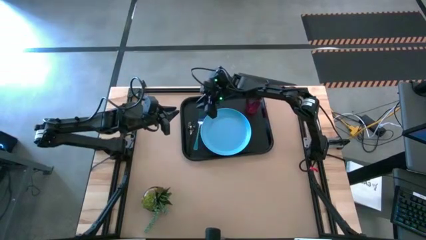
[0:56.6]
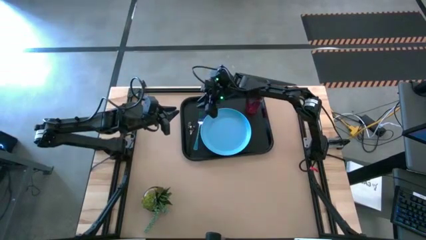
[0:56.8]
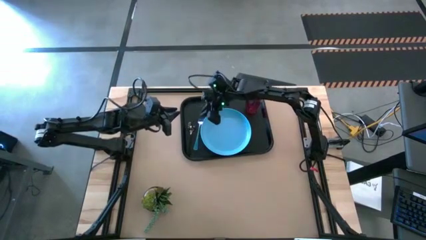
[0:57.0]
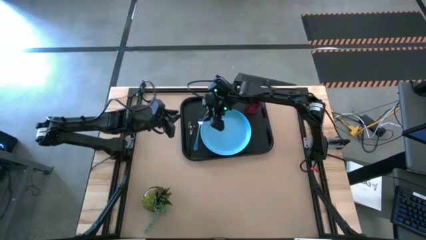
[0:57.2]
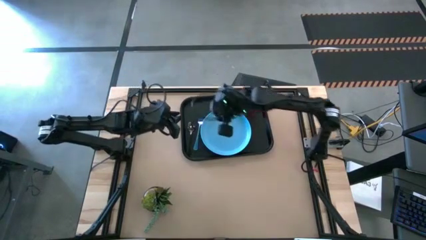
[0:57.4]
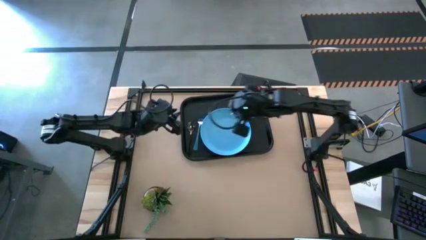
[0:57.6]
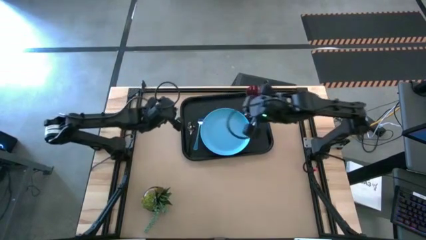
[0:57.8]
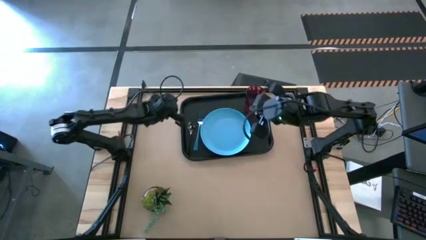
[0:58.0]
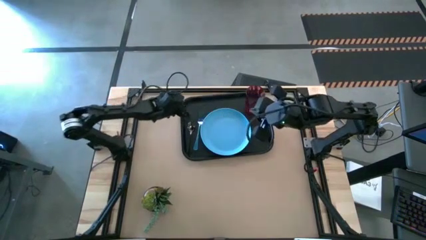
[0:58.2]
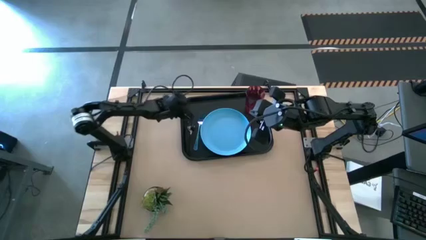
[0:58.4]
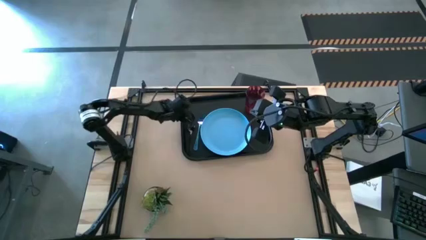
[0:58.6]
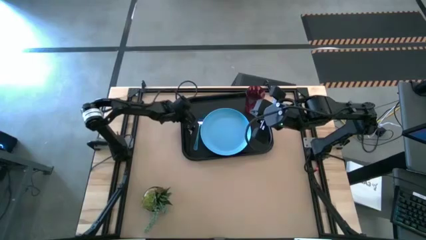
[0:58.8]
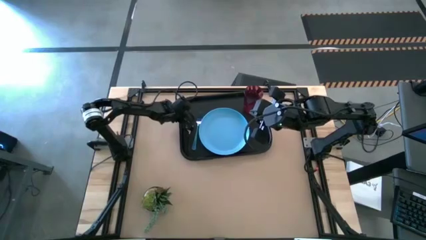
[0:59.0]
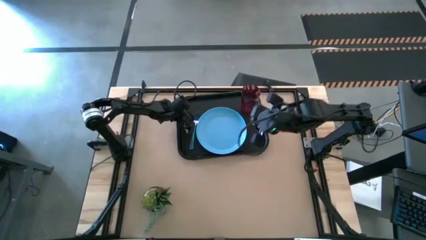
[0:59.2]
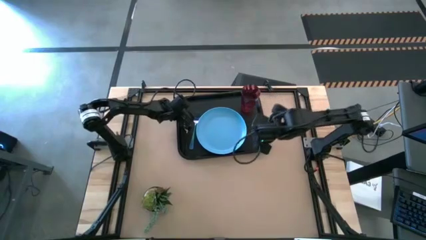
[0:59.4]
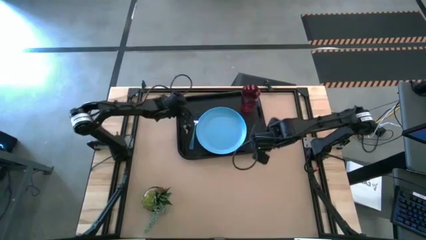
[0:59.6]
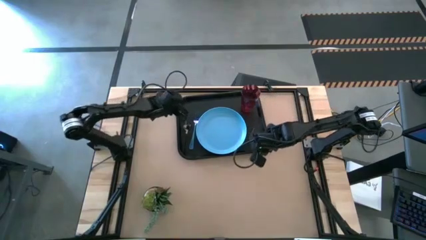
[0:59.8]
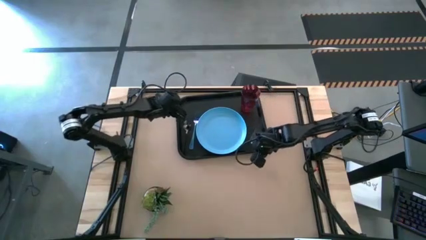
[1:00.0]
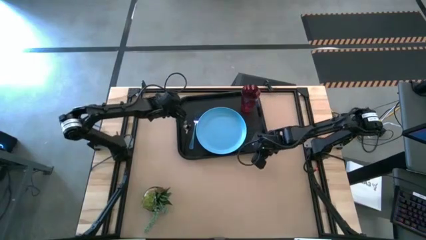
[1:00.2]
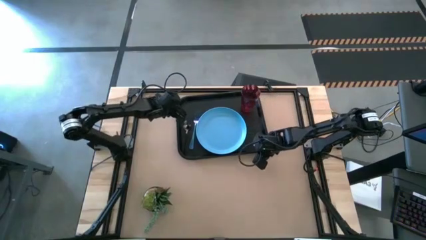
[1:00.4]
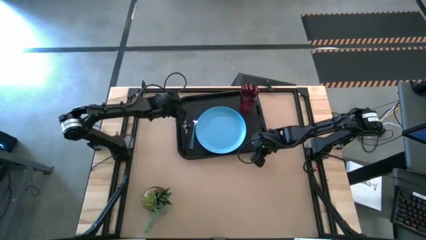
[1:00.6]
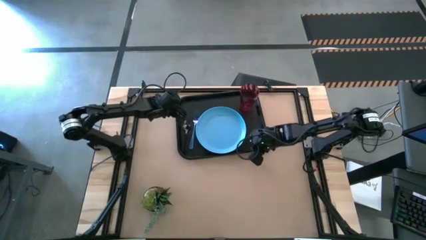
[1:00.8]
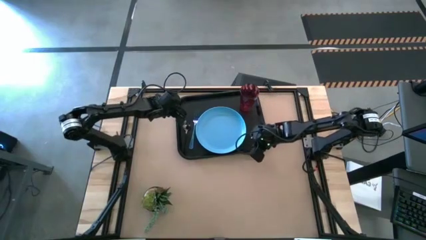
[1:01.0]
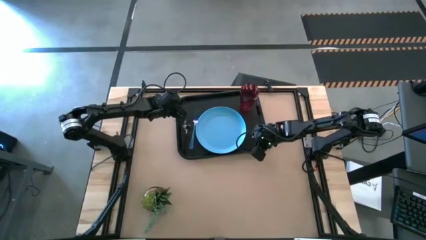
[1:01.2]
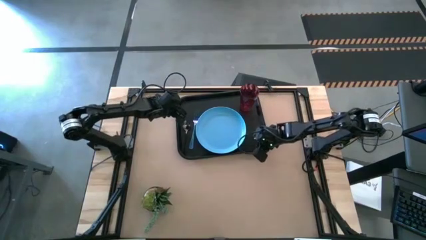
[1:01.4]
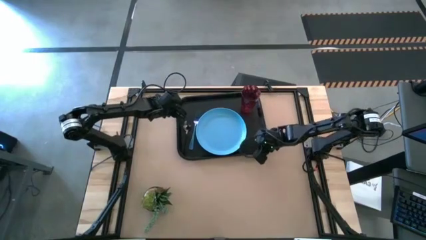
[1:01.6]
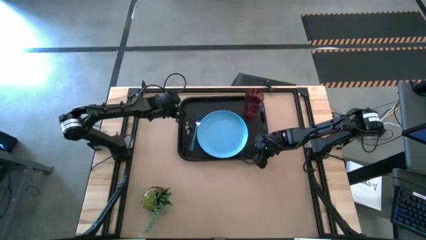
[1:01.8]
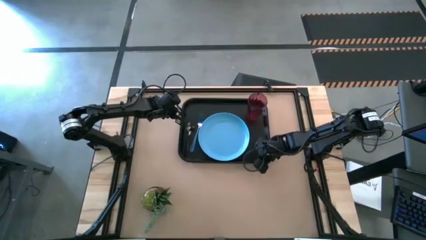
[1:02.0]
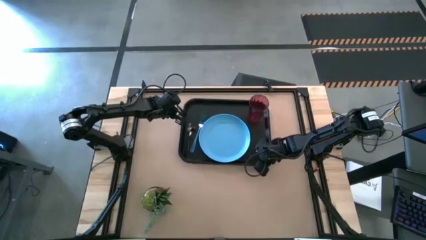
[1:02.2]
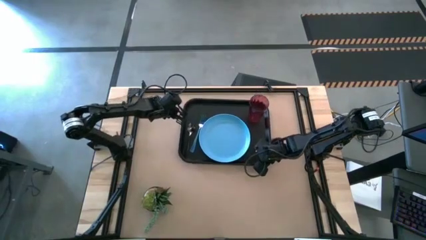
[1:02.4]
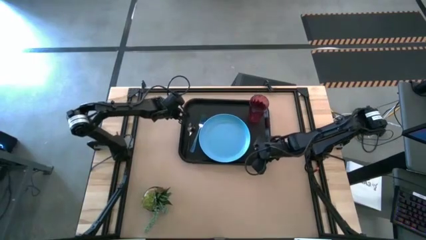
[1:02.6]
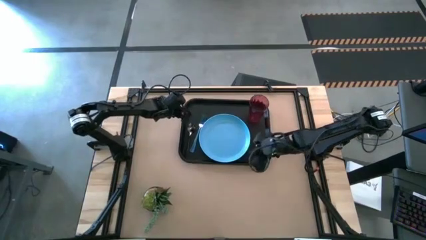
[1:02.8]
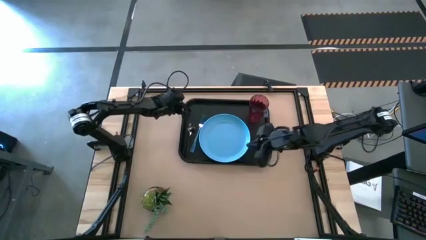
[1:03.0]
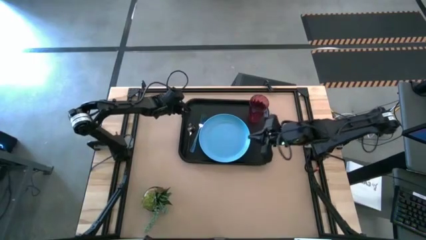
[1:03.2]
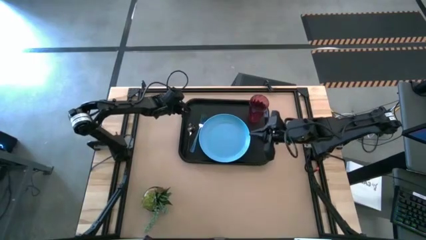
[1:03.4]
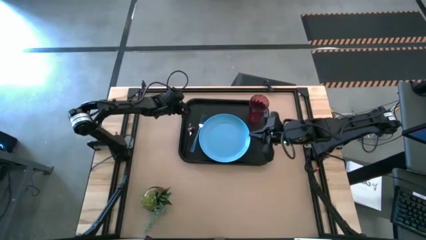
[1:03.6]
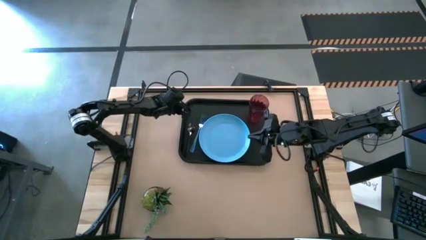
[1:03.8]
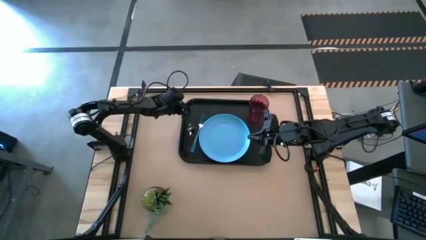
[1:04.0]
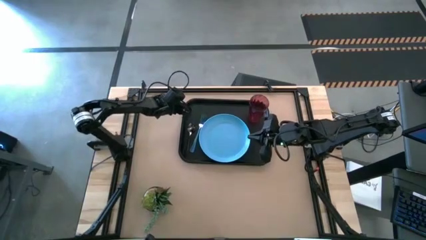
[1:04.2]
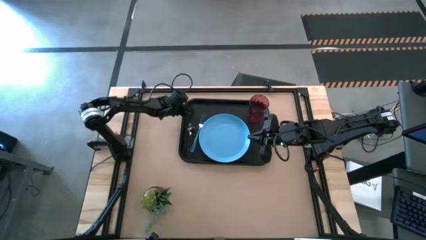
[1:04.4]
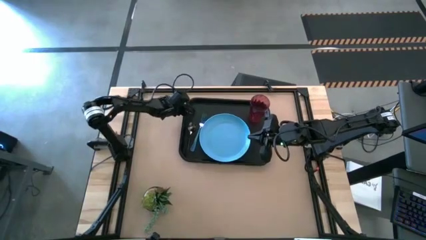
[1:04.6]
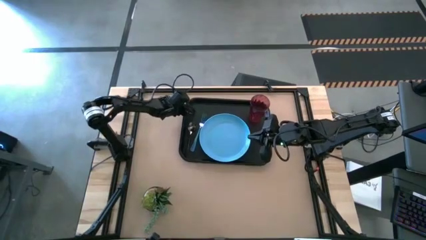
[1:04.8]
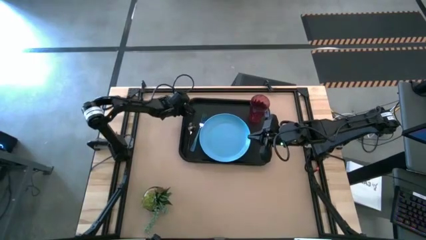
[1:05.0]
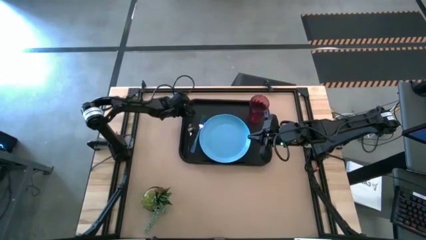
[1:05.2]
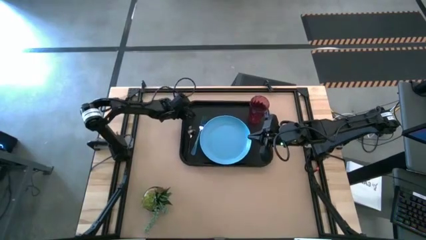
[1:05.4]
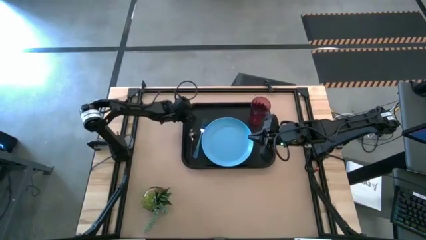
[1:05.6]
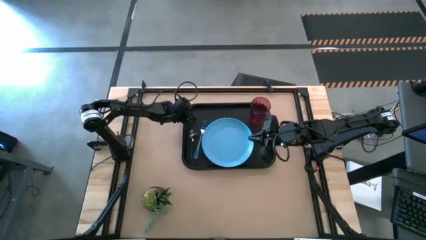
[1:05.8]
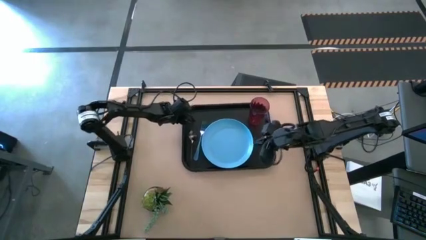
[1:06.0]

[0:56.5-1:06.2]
Task: Pick and place plate/cup/fork/spoon on tray
Adjust the black tray

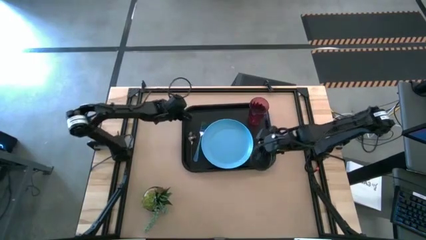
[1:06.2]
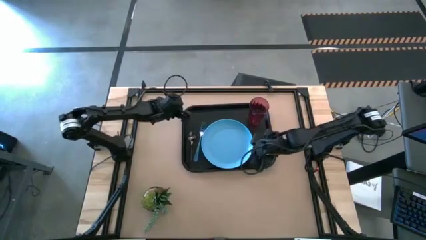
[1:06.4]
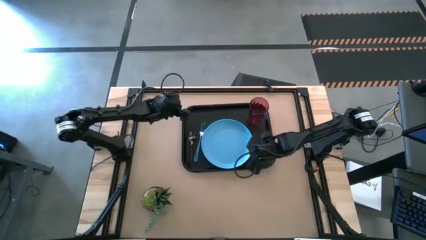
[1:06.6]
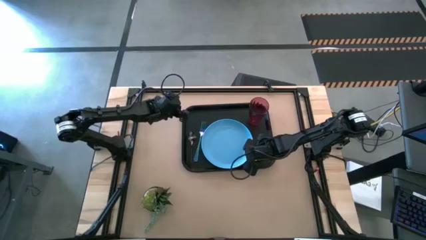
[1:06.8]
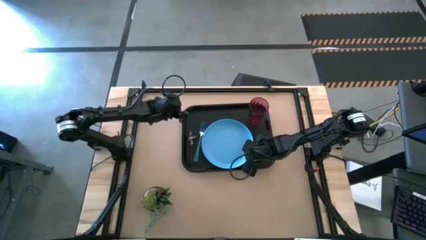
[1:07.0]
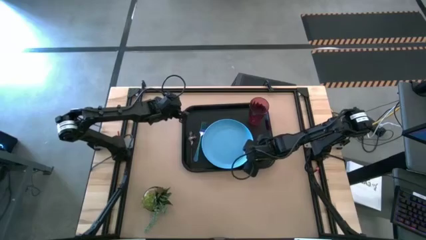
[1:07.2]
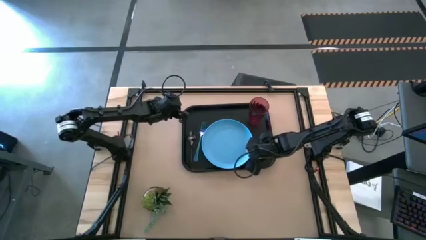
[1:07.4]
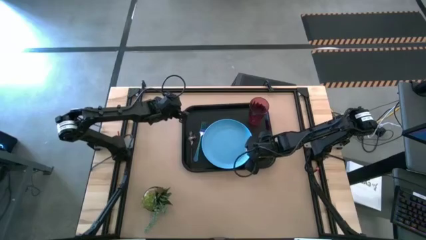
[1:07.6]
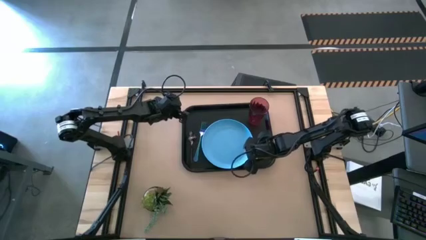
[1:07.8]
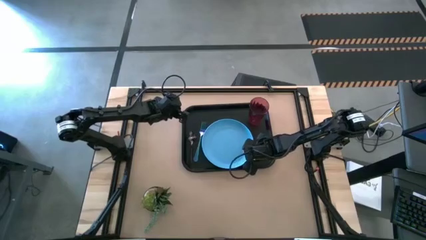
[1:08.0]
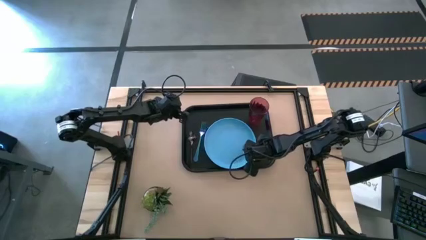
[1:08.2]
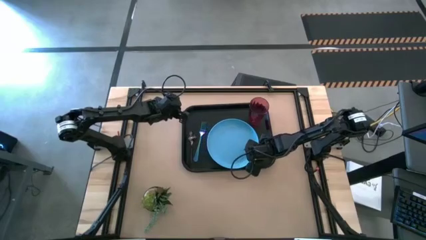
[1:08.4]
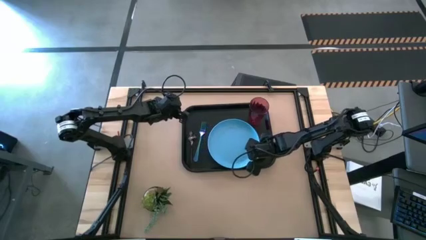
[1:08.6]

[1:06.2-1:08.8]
Adjust the blue plate

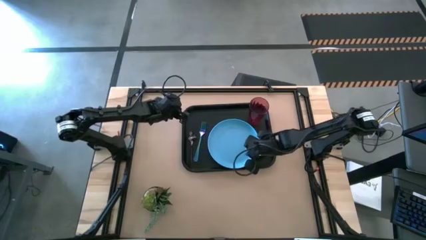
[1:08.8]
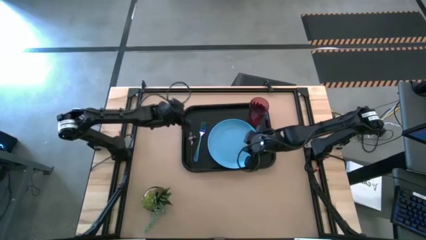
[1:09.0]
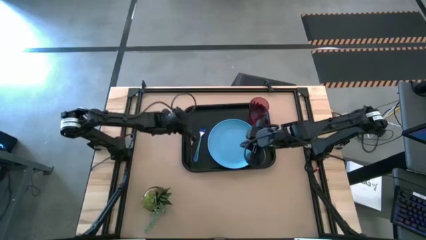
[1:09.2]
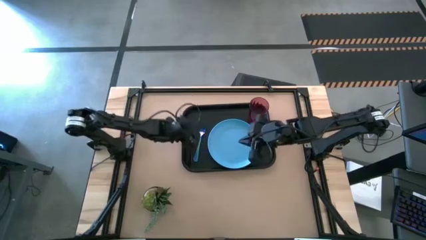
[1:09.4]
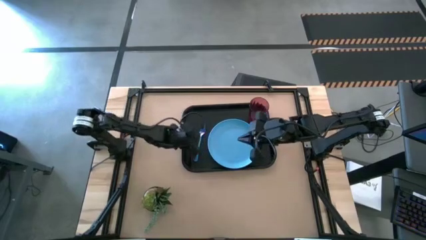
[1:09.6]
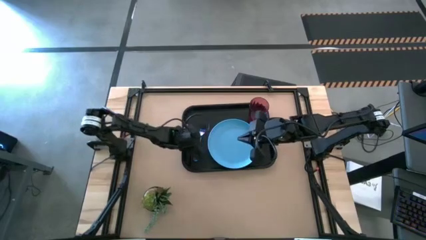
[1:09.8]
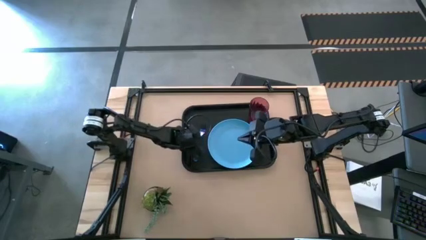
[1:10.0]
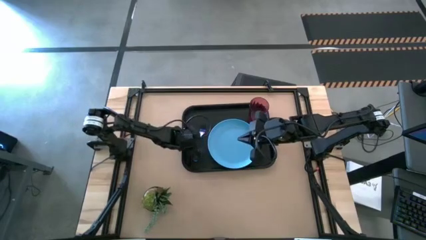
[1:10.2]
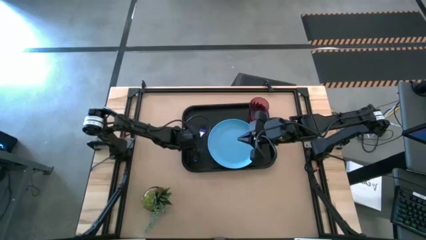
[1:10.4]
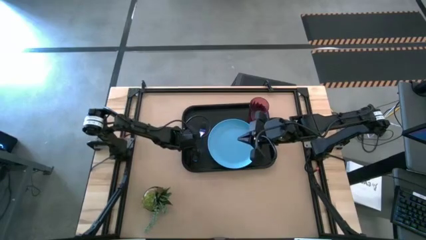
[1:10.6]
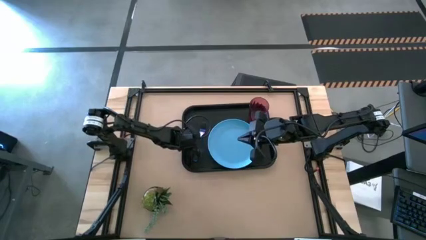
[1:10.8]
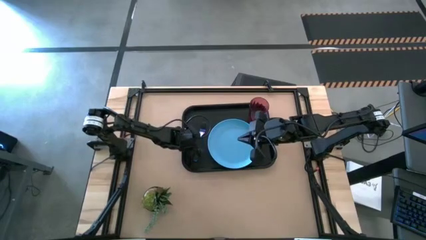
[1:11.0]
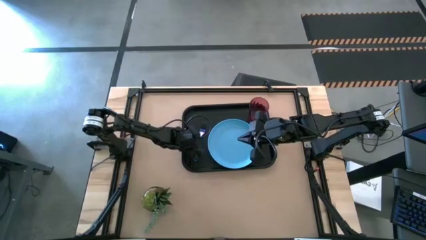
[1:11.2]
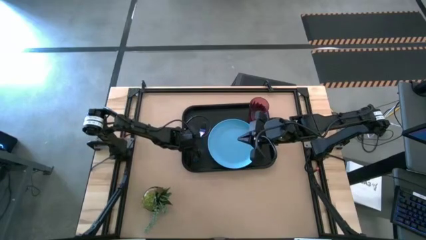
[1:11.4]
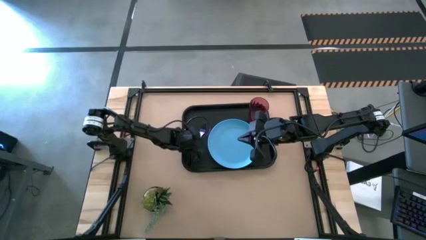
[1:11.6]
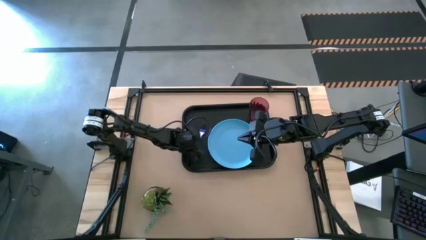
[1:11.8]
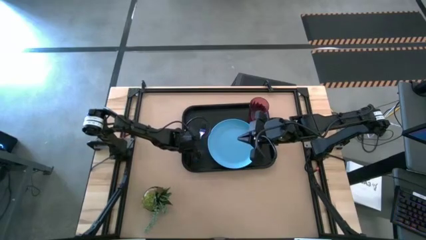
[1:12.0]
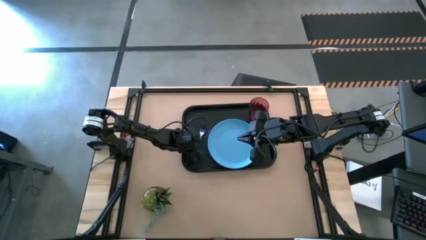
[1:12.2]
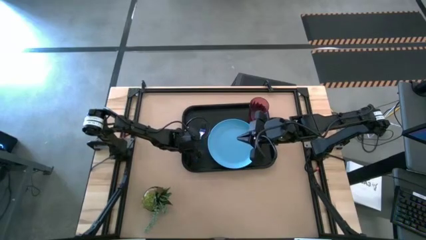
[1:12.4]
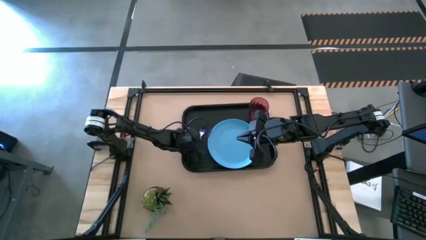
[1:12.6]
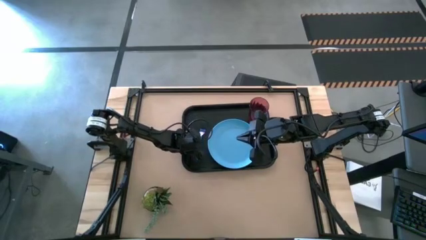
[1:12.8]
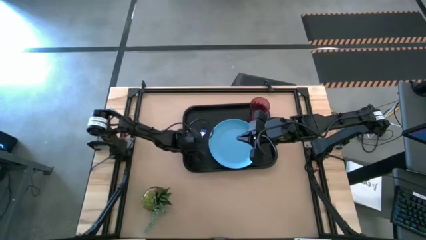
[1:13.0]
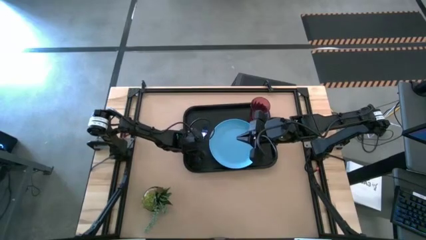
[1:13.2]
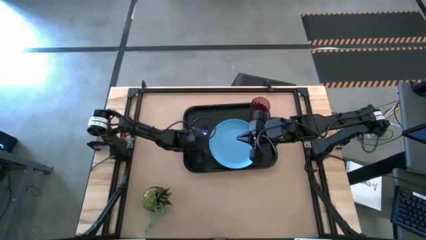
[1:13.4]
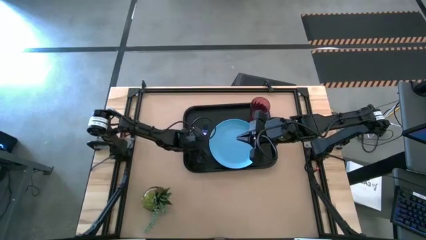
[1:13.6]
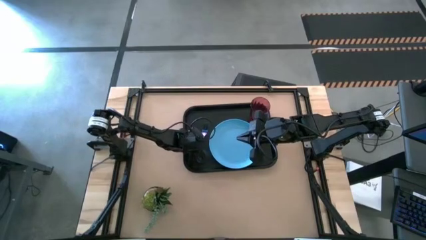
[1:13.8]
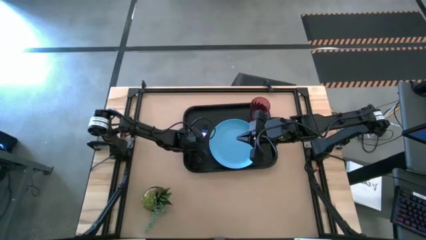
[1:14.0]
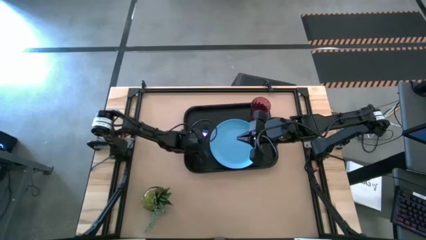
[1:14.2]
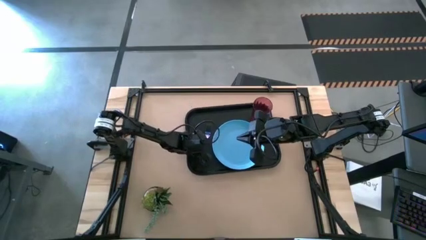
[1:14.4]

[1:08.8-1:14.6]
Adjust the blue fork

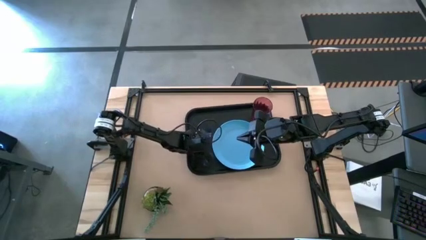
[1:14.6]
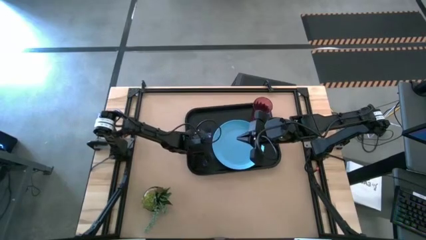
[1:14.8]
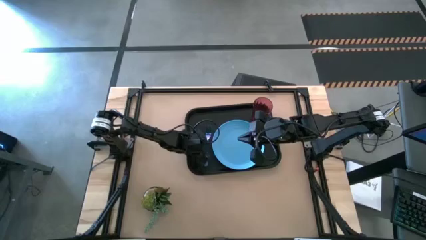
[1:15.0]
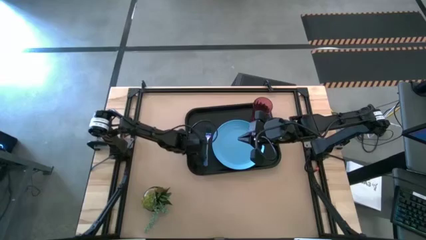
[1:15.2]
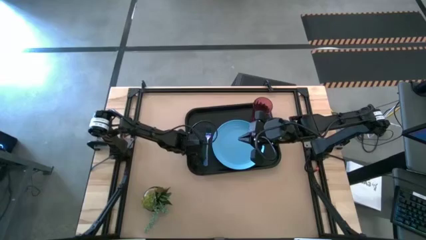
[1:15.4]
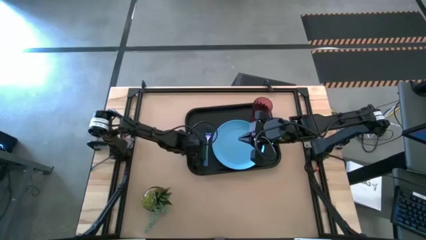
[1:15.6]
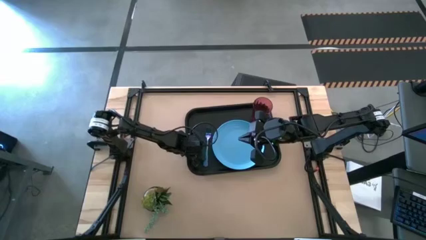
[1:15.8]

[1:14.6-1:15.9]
Adjust the black spoon
